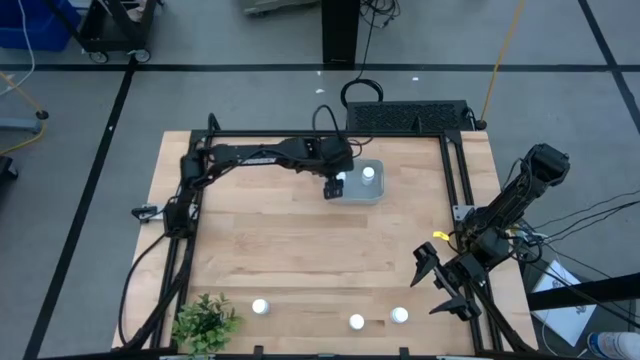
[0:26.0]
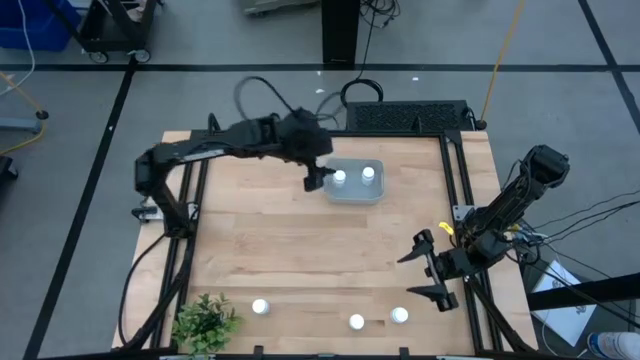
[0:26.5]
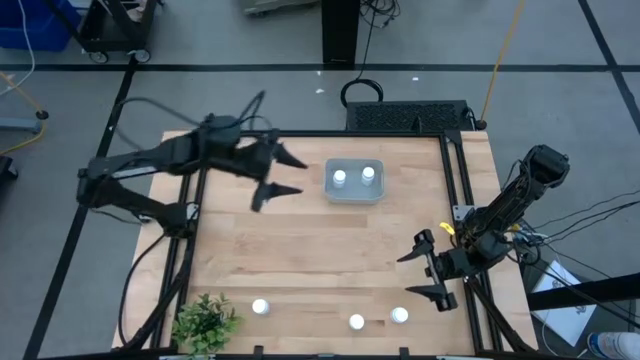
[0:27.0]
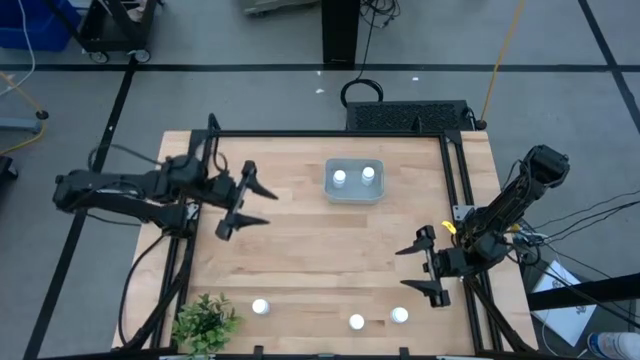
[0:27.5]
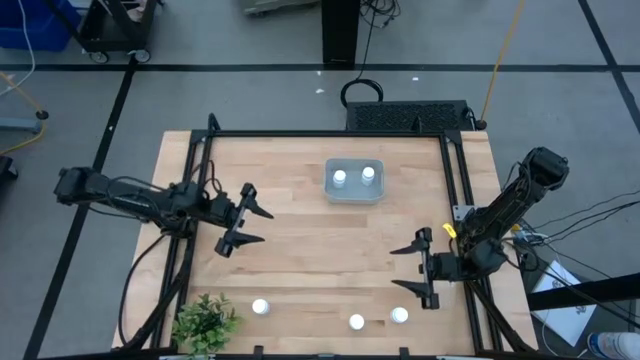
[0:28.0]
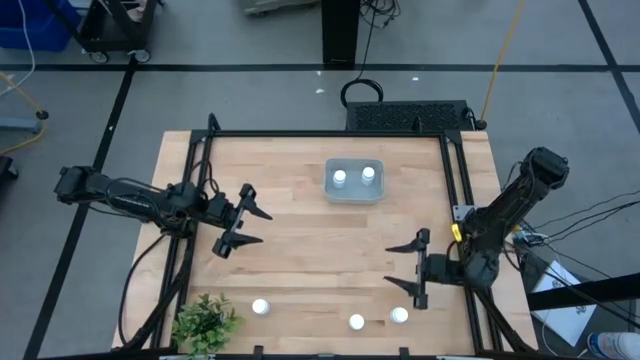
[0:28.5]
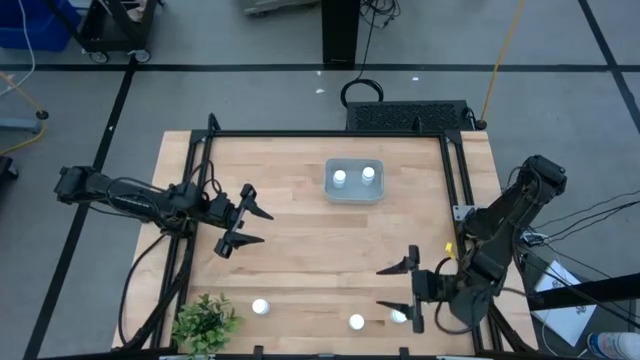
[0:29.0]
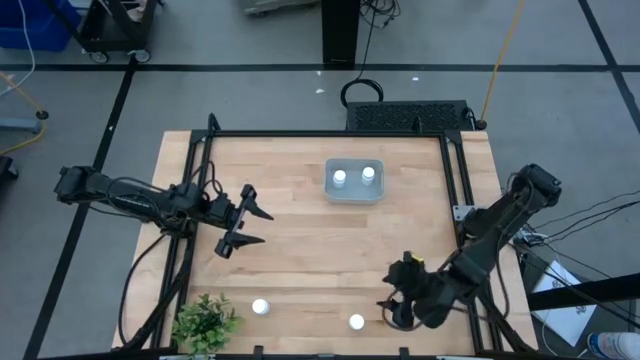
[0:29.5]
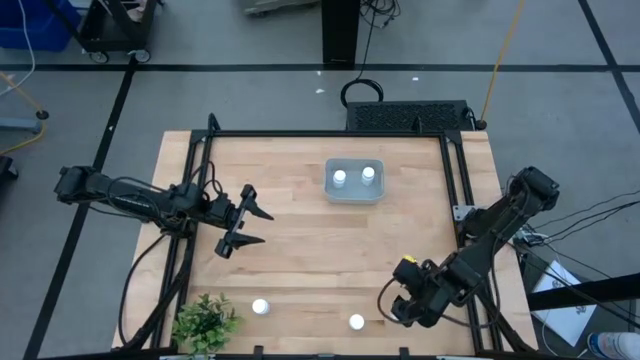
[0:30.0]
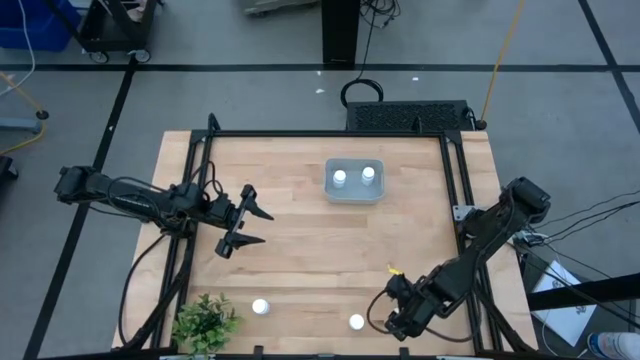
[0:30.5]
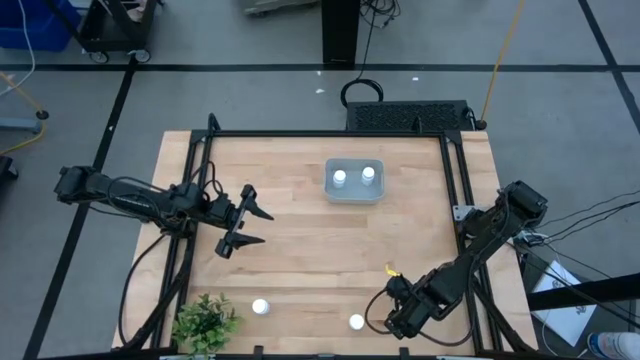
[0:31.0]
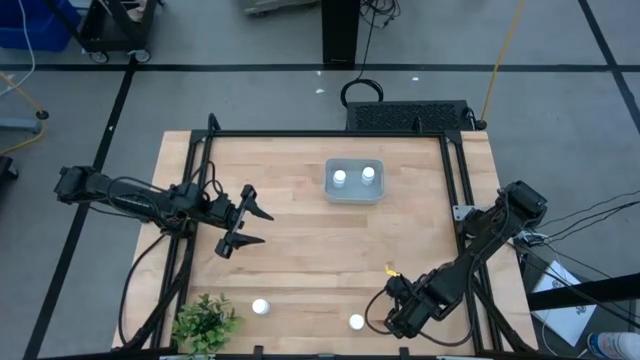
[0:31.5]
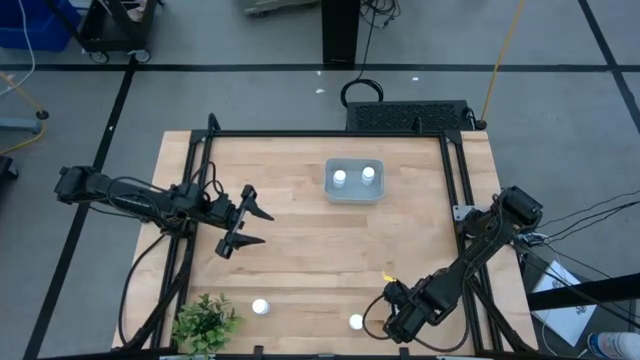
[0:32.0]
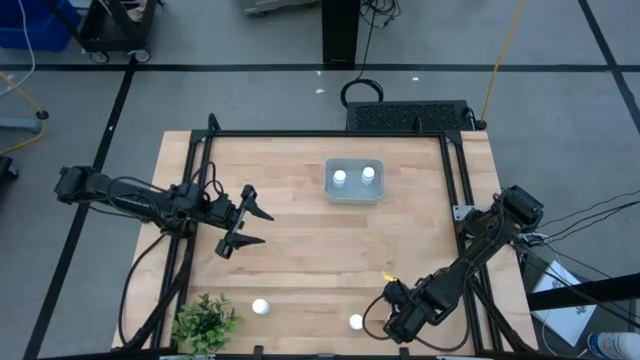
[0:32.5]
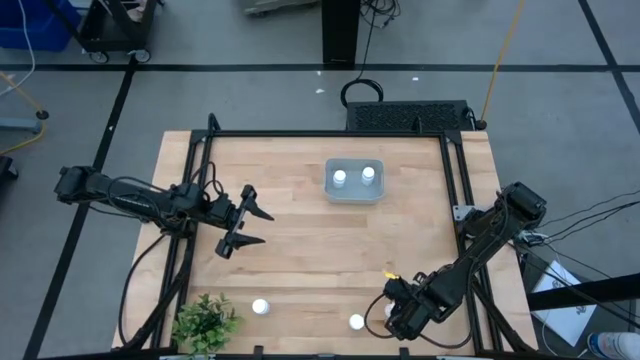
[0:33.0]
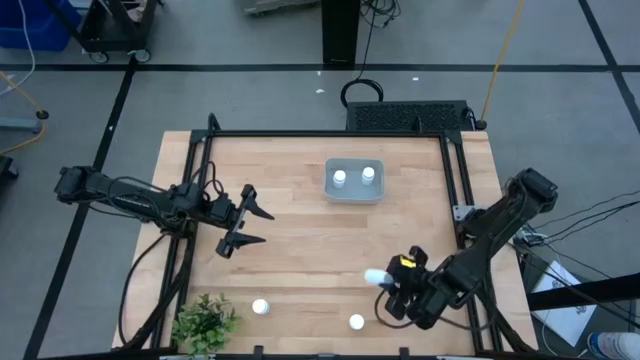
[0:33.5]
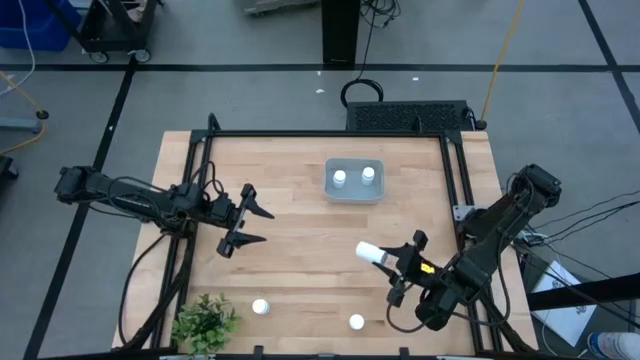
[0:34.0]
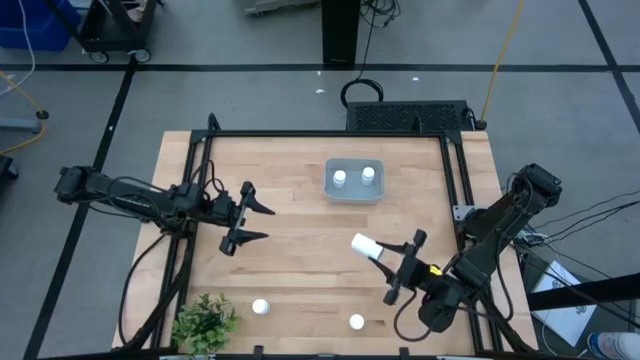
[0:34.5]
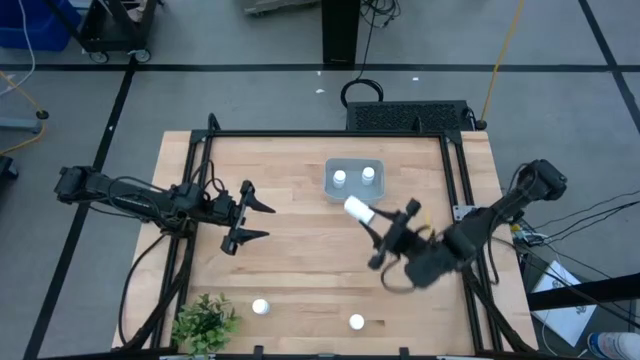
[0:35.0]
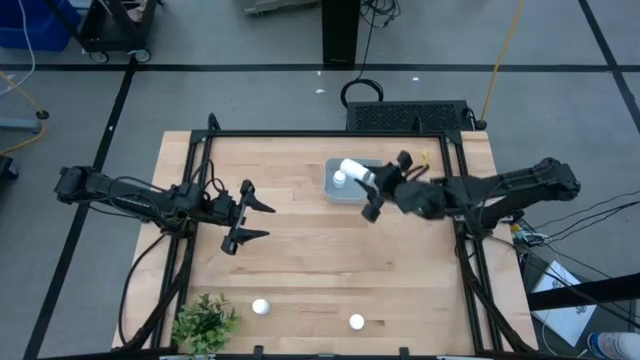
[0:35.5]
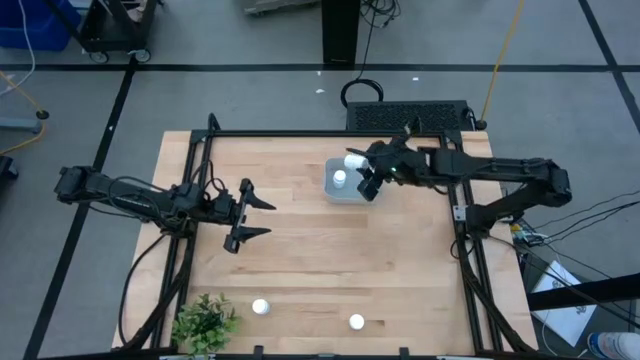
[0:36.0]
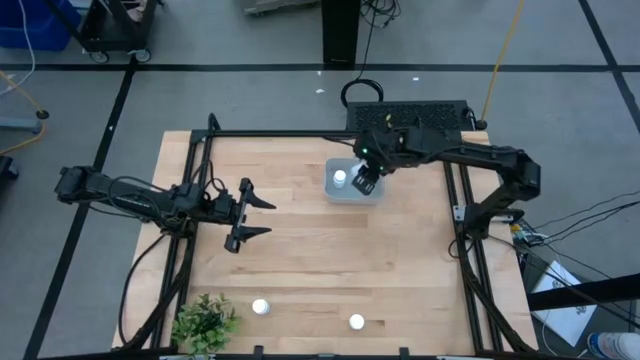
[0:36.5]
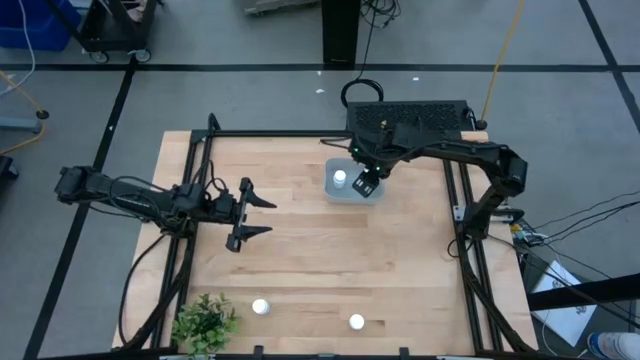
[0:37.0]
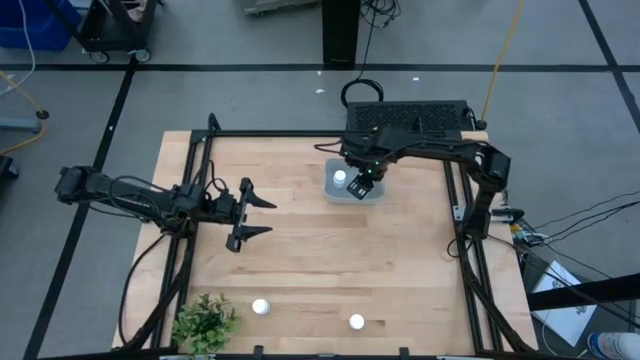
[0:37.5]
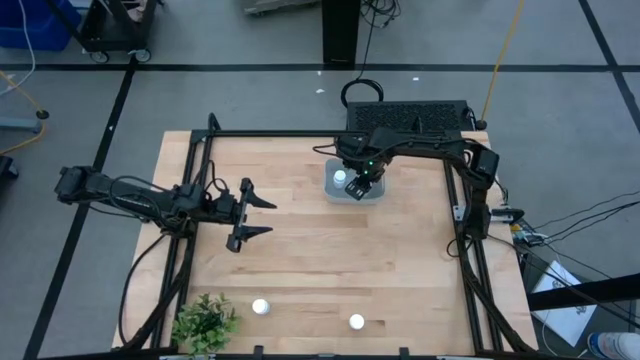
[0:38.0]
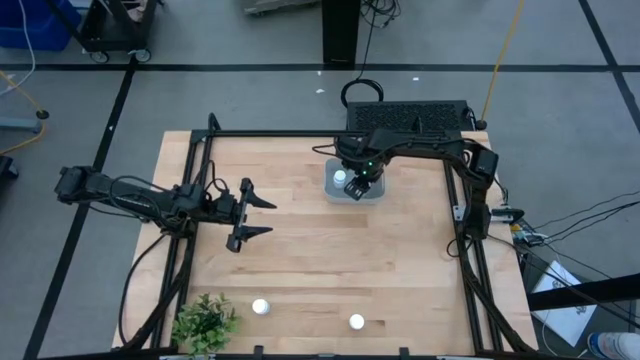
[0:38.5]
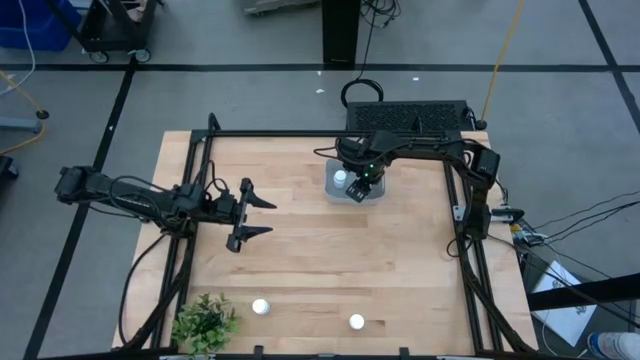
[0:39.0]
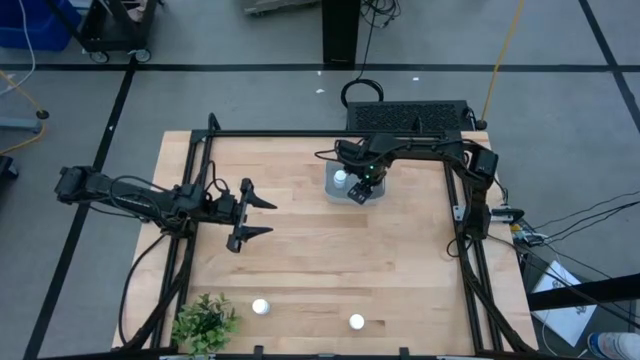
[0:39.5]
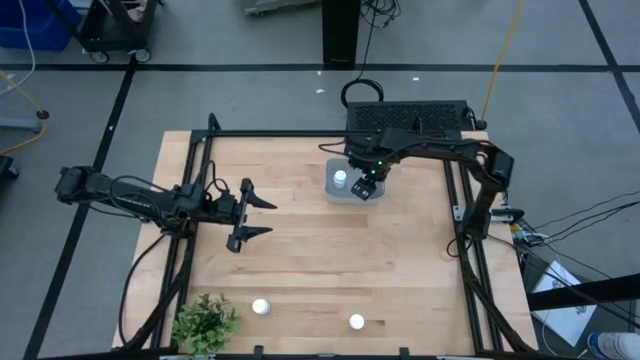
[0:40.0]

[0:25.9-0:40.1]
Task: Pick and place pill bottles into a basket
Put the white medicine bottle into the gray bin

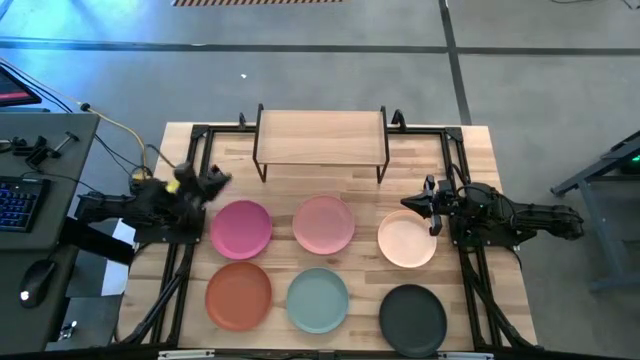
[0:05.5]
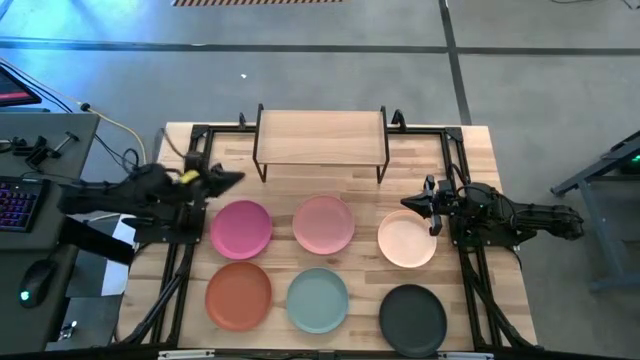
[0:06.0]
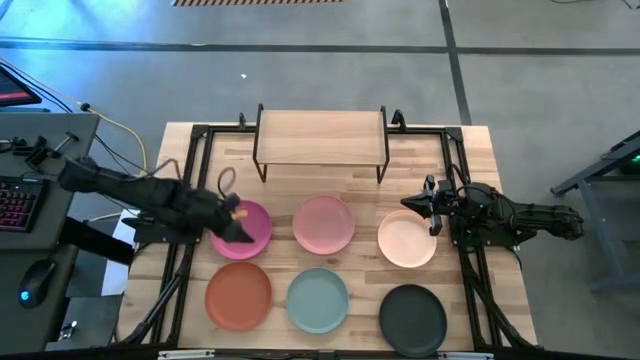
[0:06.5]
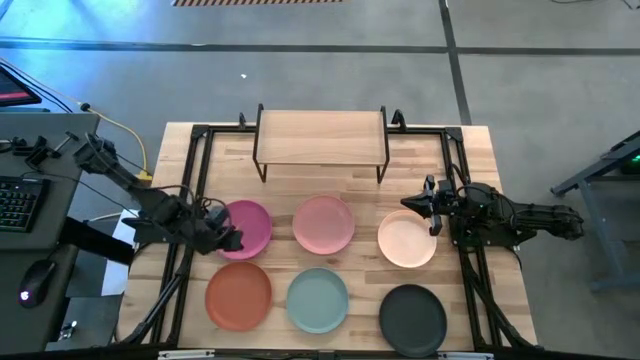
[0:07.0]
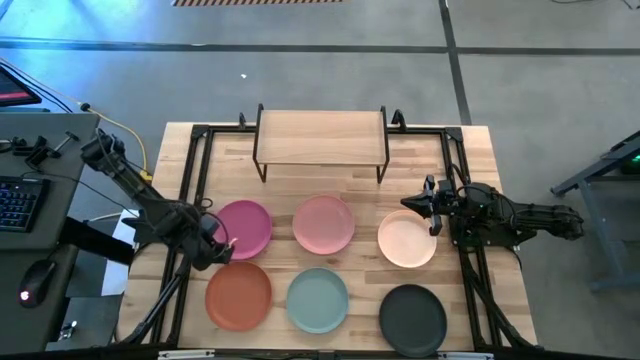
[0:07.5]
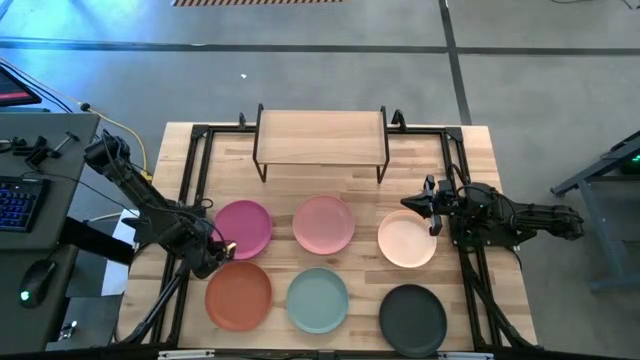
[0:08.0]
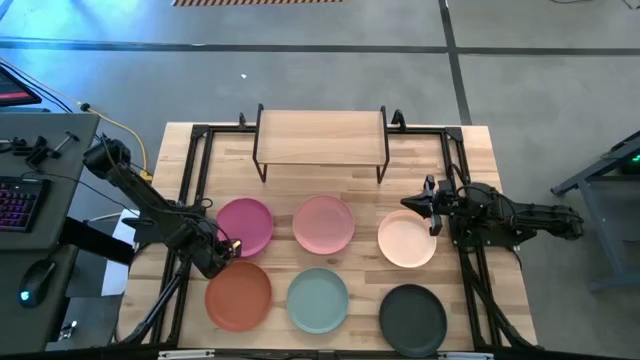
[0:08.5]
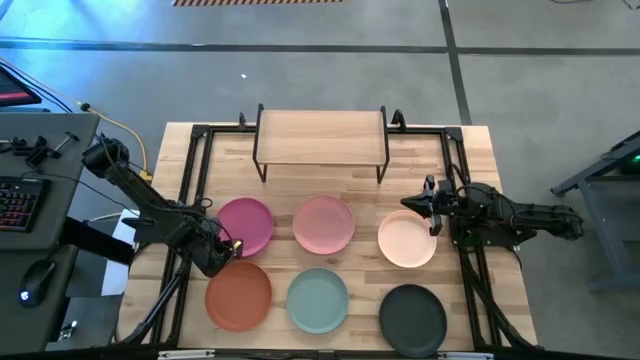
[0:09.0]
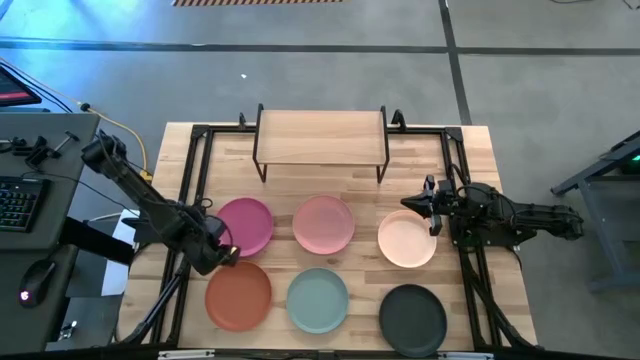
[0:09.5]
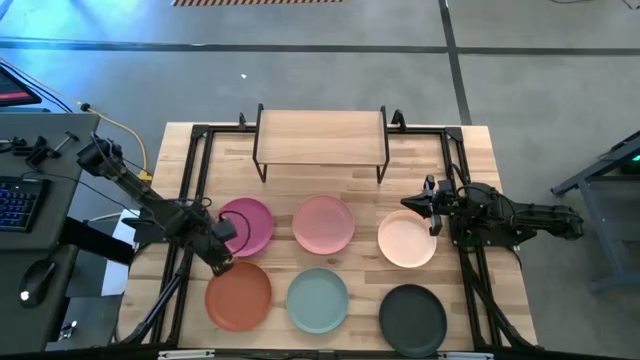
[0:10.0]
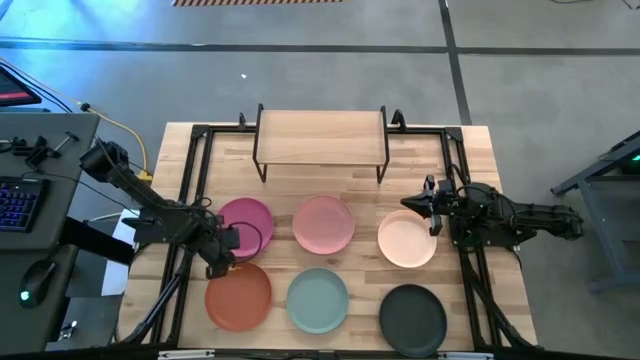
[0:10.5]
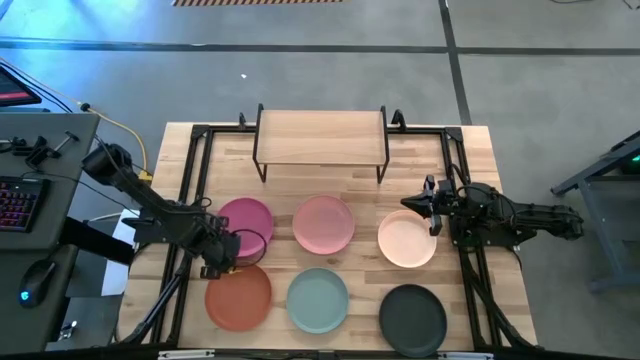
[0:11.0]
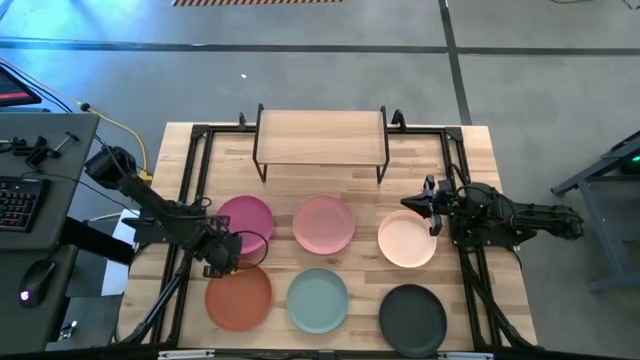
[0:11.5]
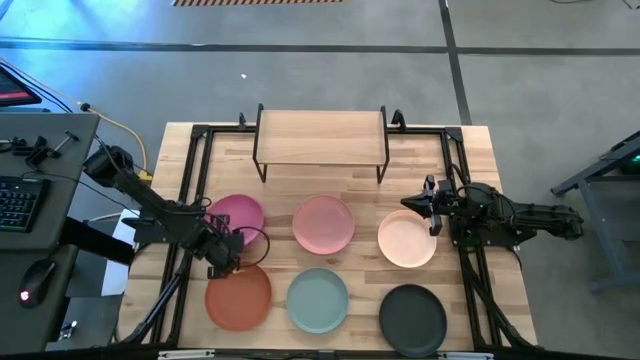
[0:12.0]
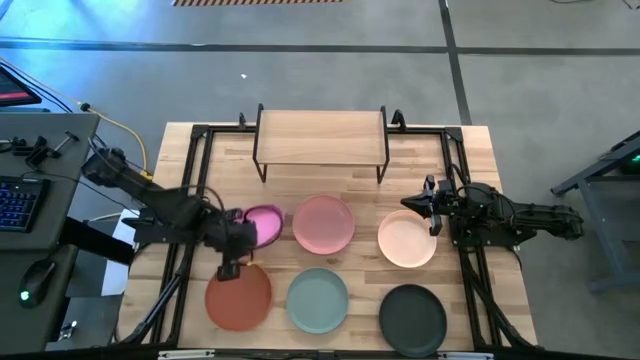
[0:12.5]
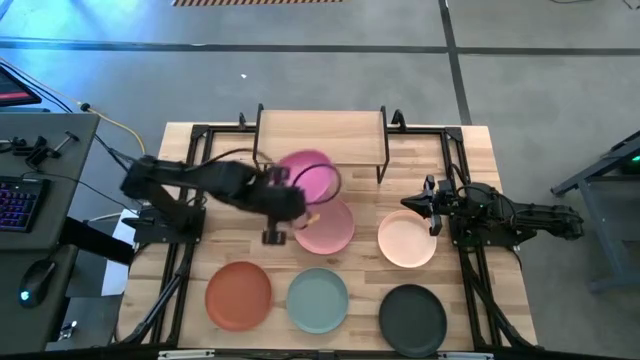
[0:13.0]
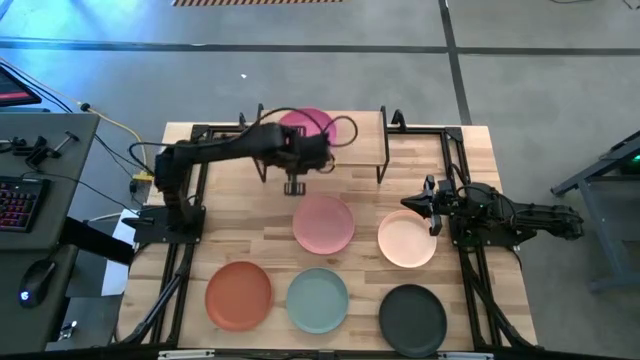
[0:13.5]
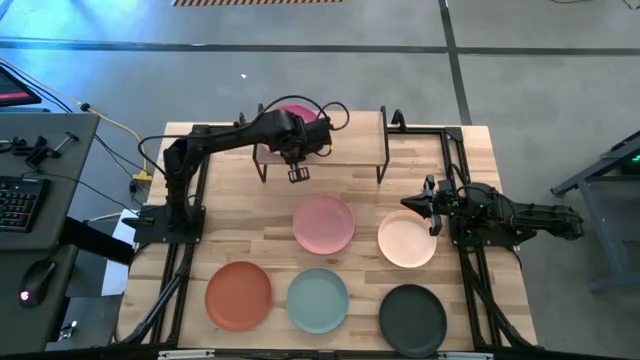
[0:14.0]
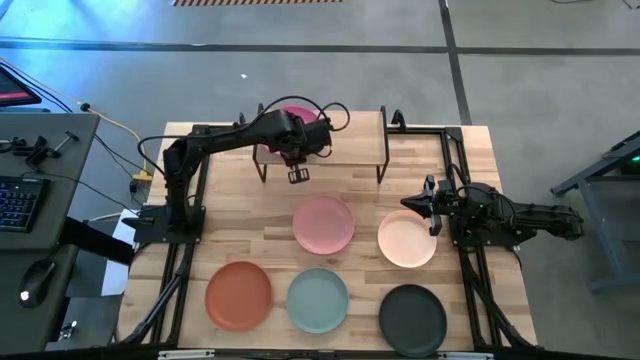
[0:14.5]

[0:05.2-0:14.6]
Task: Place and stack plates onto a shelf
Put the pink plate on the shelf
